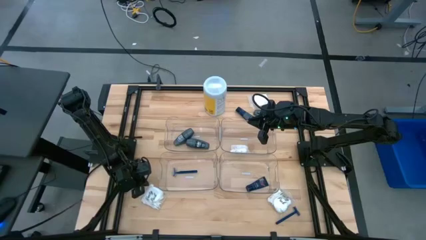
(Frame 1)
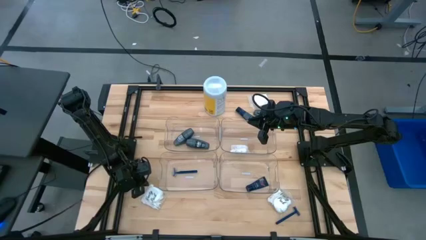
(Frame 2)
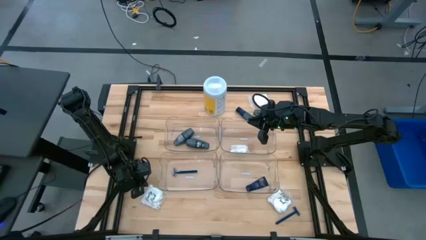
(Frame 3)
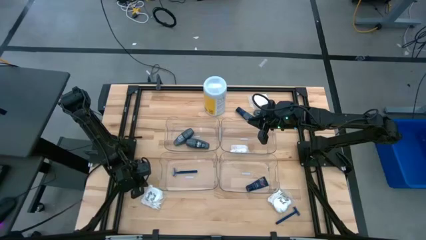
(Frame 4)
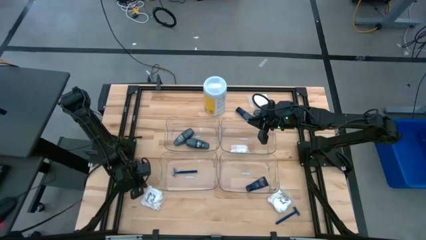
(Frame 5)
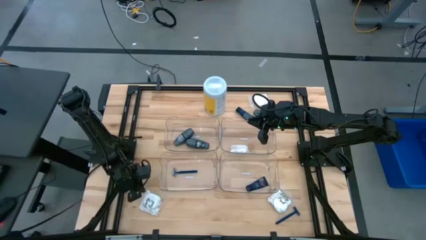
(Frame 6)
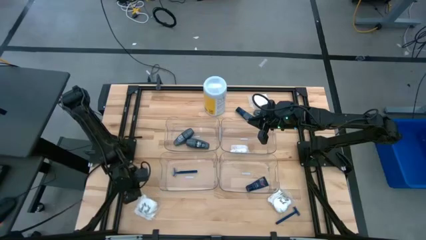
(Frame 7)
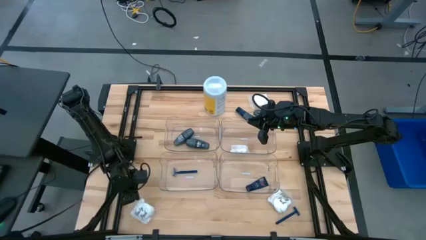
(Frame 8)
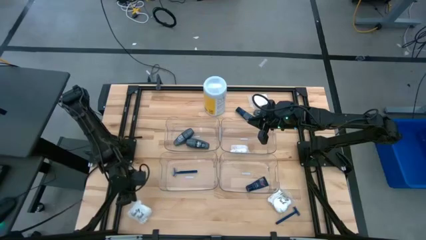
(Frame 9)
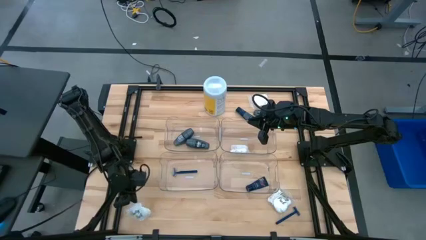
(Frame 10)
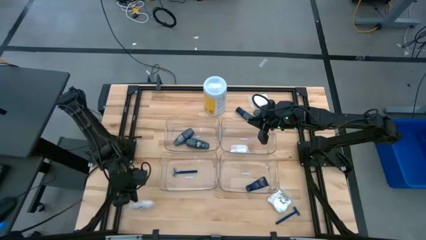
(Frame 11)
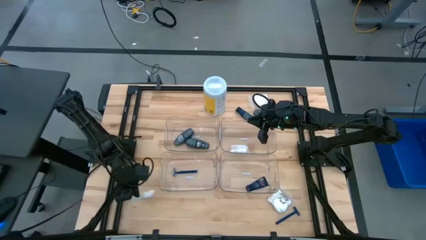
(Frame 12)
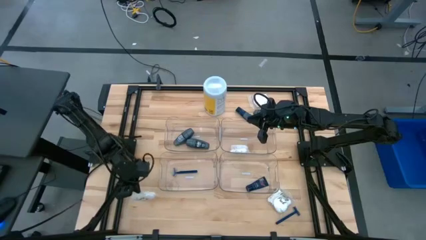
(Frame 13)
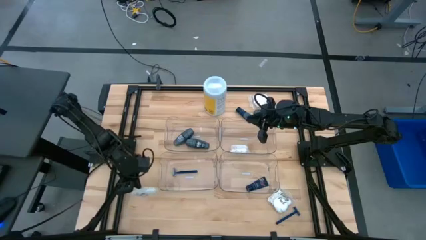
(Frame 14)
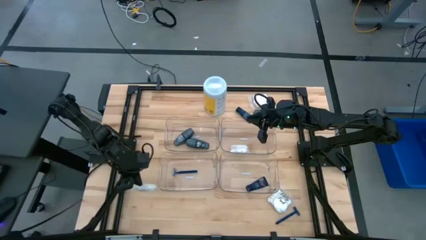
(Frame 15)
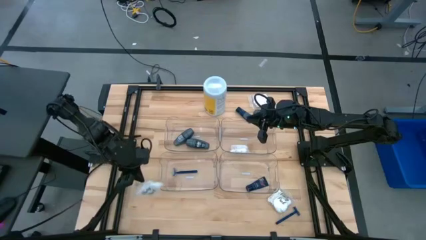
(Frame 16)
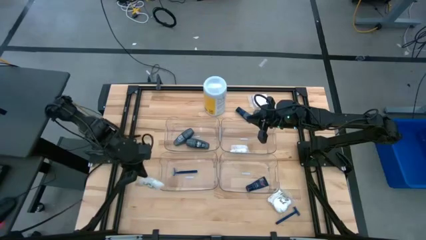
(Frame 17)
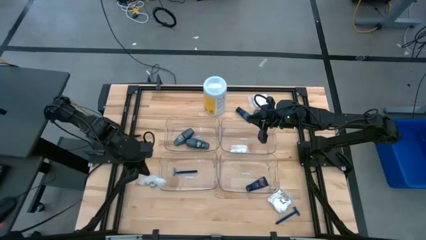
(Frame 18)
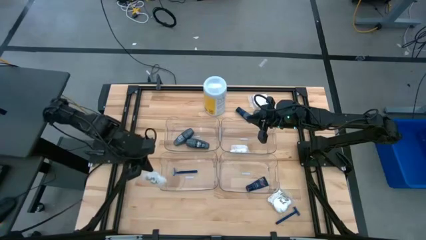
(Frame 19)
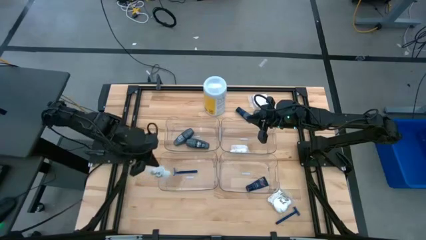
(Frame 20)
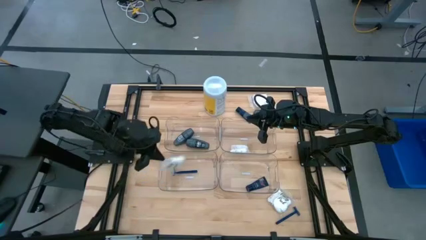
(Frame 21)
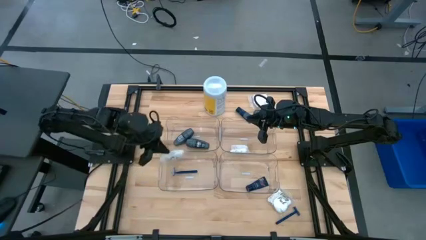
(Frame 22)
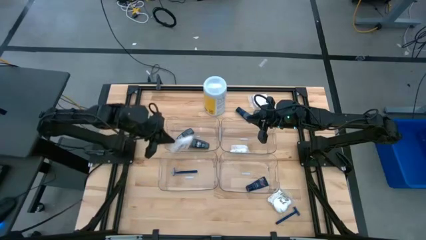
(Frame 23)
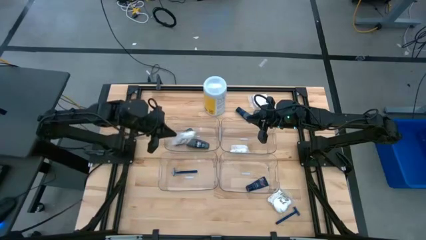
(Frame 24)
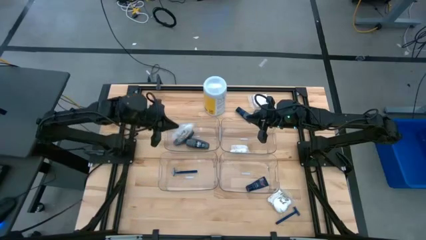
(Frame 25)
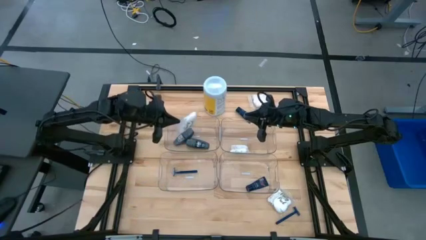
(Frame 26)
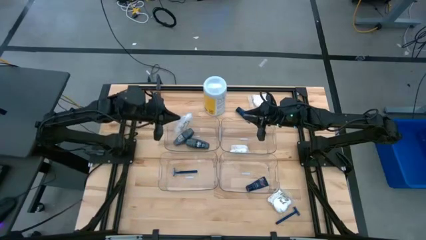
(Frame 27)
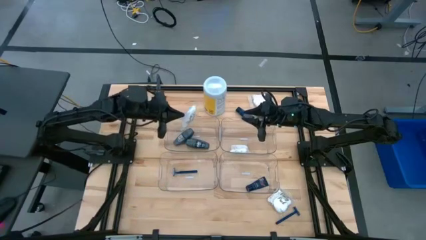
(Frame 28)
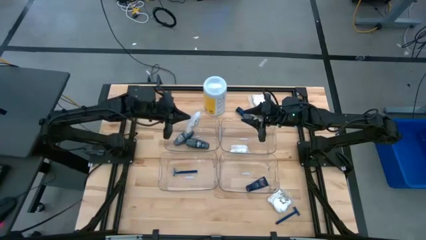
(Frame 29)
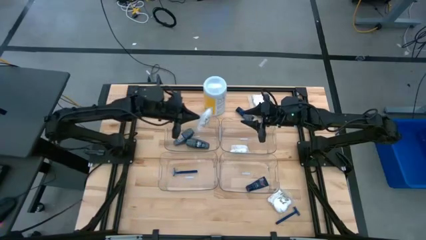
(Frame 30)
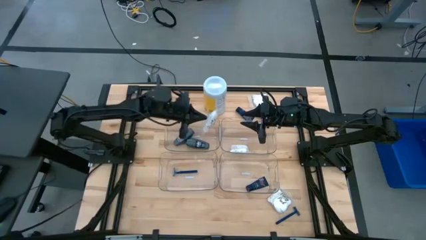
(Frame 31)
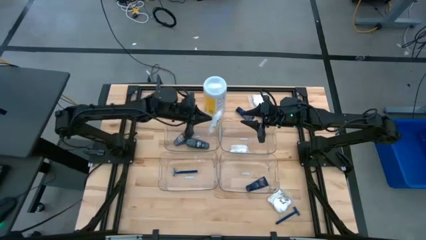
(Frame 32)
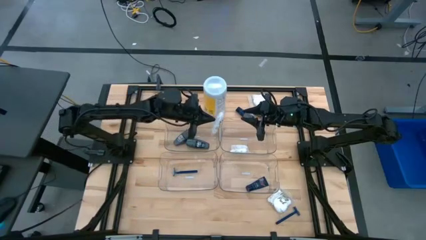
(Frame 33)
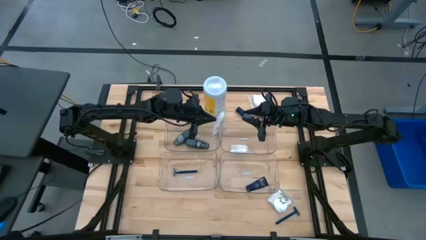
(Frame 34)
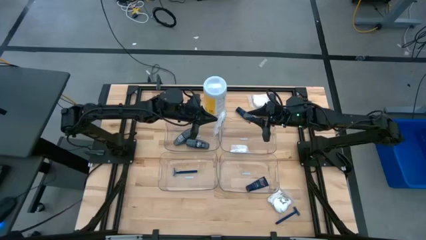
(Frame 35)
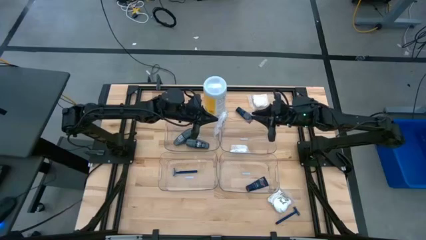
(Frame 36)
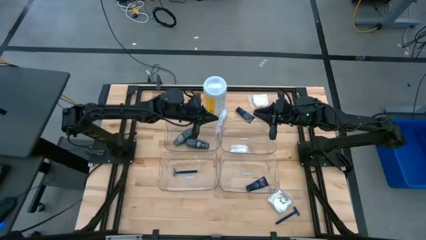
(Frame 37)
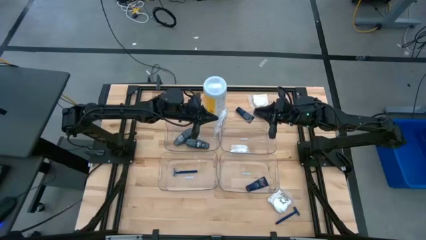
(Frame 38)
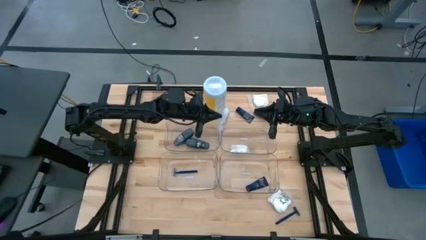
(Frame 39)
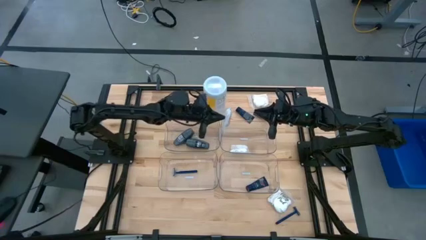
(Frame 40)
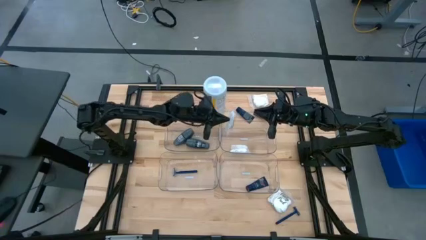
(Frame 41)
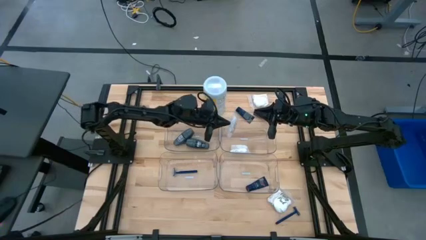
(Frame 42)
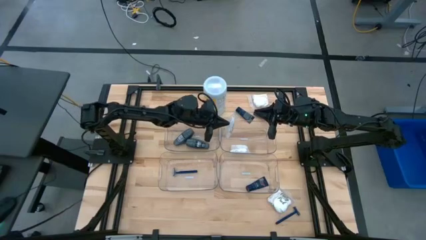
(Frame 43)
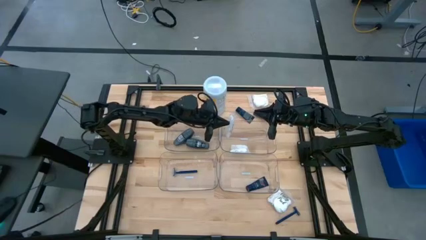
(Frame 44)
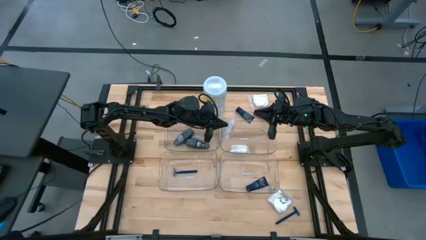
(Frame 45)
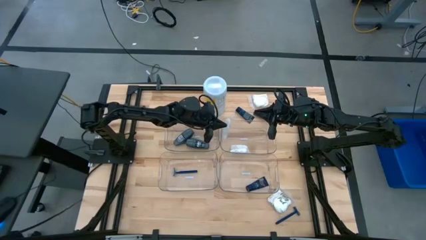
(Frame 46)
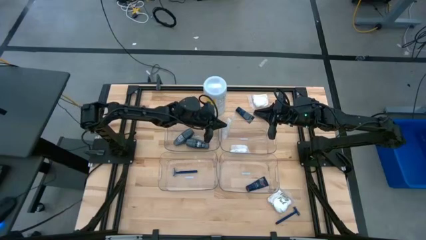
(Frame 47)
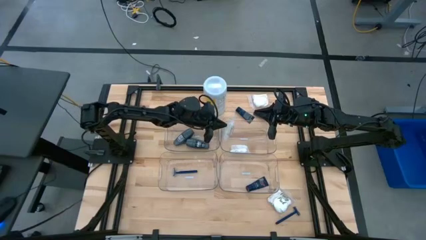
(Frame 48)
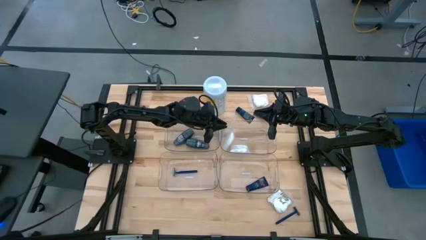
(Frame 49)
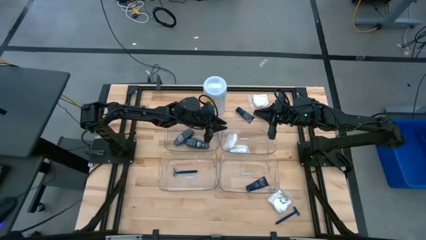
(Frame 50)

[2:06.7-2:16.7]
Task: Pick & Place Travel size toiletries
Put the transparent vanity pack into the top right transparent bin

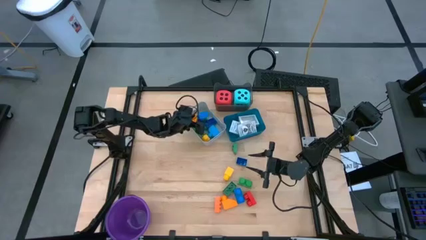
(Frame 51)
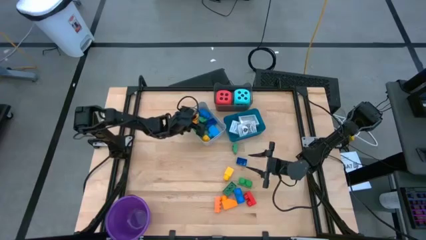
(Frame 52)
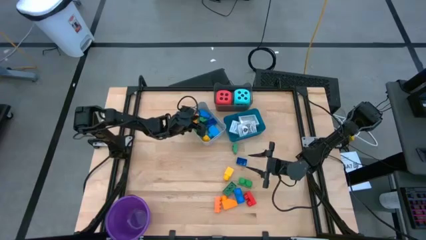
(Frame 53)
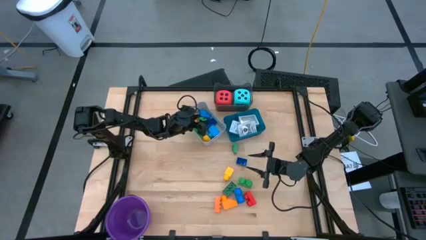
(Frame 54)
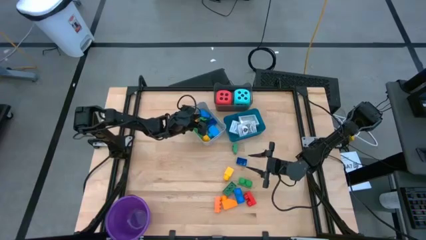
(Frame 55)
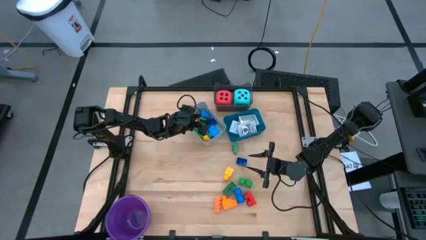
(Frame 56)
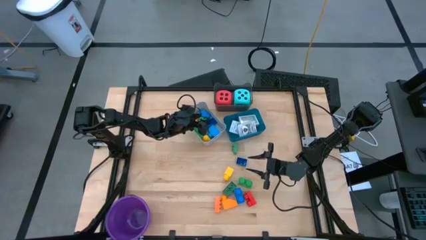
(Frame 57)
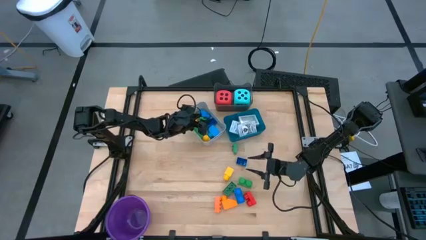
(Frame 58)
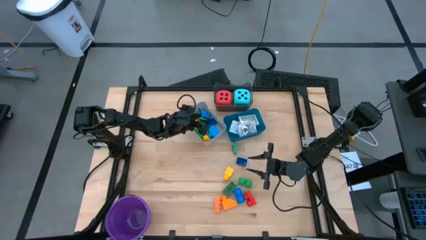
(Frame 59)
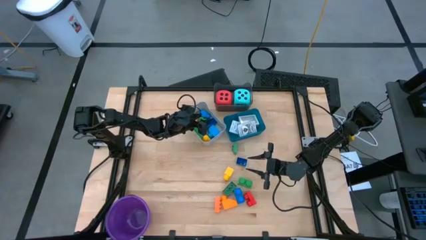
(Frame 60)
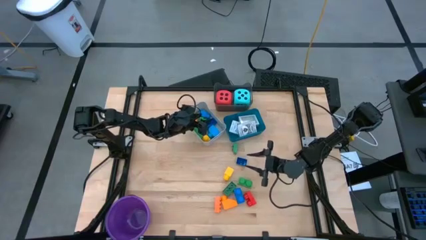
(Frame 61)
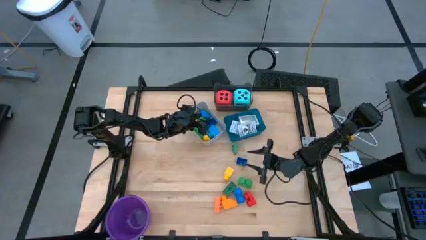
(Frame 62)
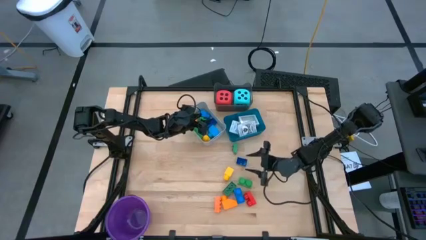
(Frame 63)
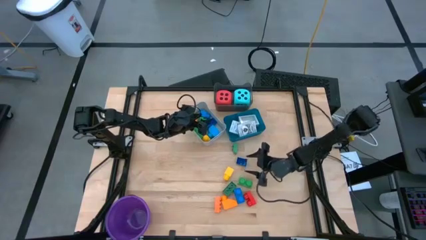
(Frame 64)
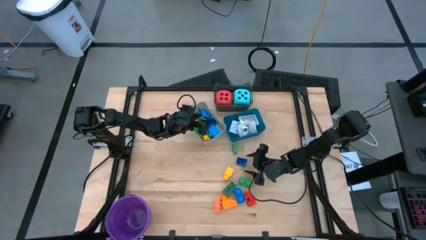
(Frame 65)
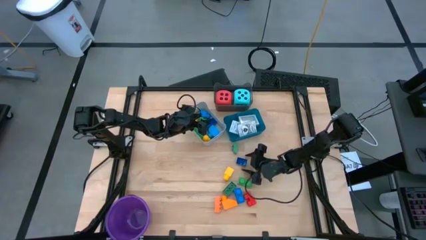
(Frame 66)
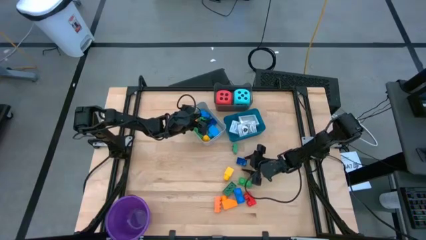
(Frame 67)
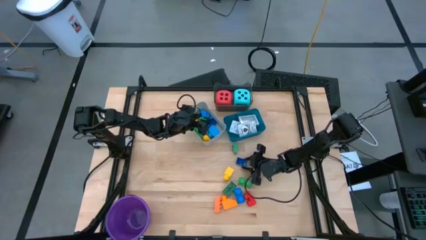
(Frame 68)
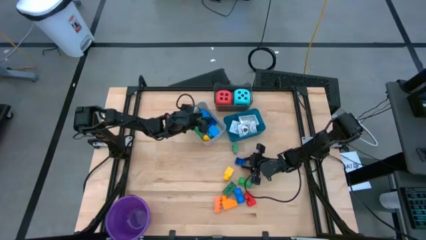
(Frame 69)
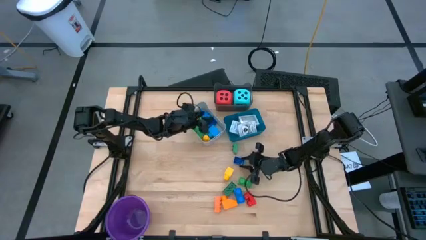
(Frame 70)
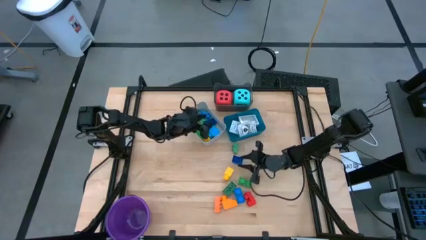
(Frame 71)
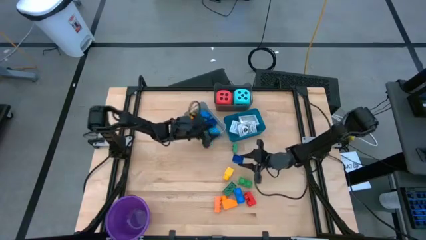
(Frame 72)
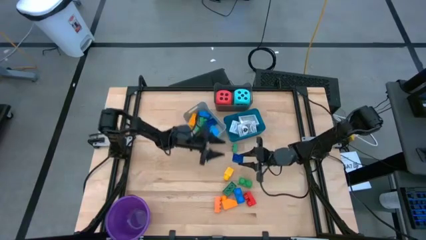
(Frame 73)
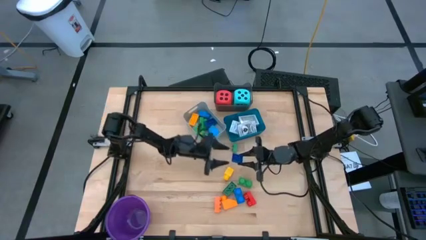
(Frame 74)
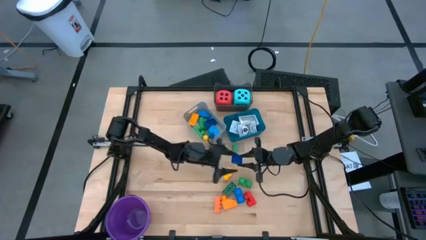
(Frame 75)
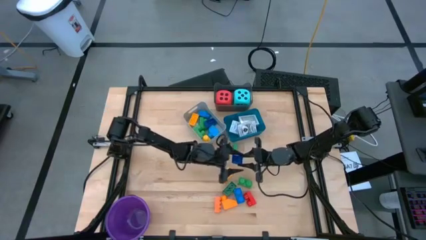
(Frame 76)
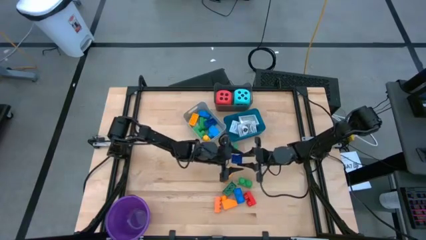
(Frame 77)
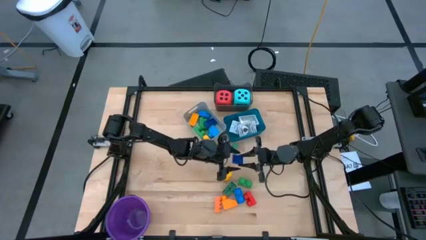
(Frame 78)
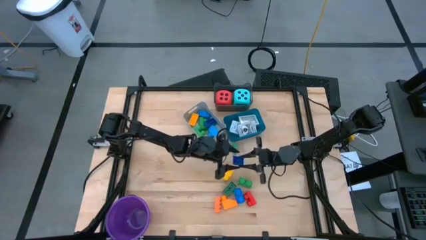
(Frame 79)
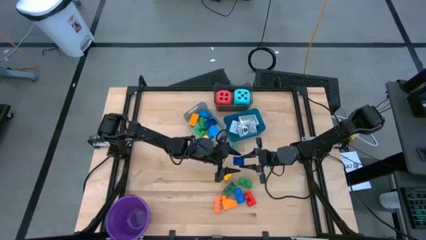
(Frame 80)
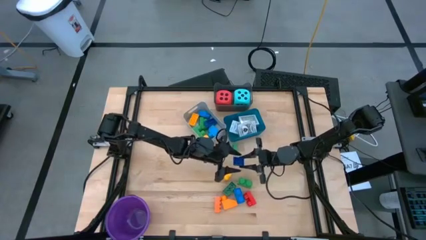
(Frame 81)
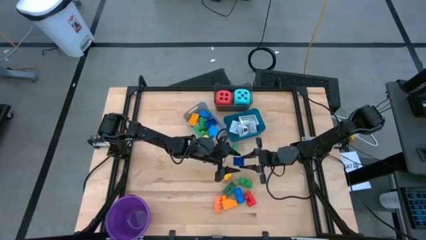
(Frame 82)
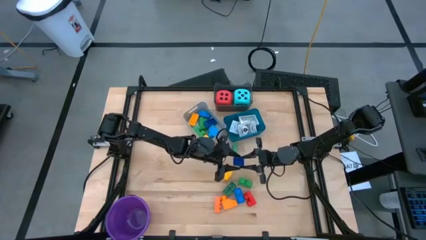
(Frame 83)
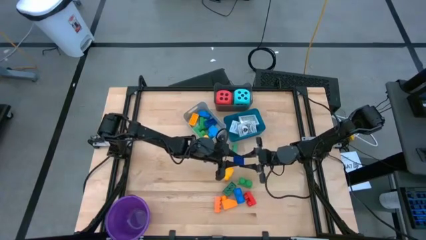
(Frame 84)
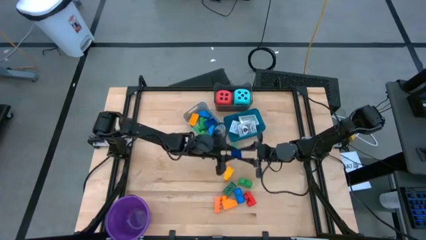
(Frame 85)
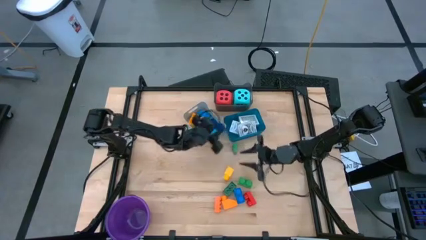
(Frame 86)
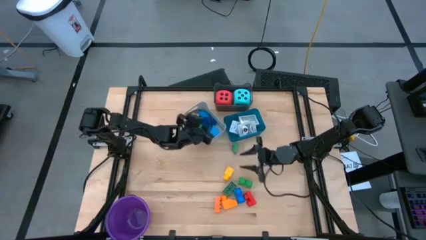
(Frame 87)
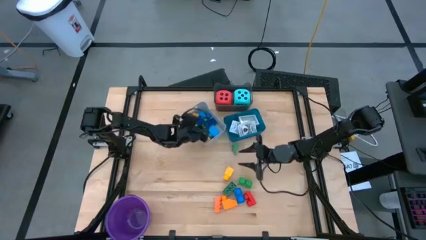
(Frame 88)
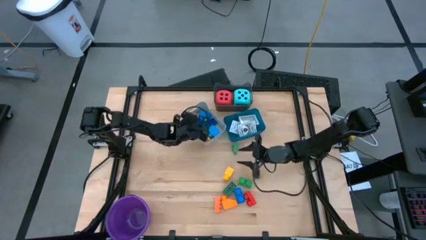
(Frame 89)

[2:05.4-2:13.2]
Task: Pick & Place Toys
Put the blue game piece into the gray bin
